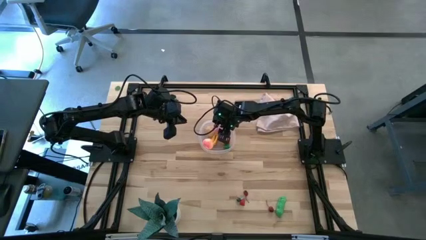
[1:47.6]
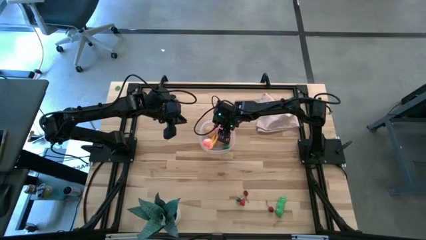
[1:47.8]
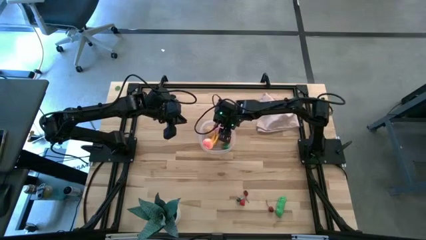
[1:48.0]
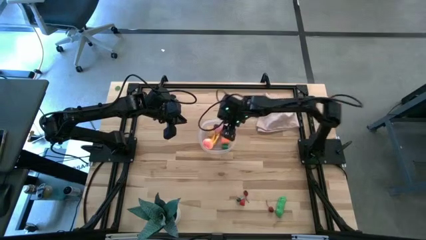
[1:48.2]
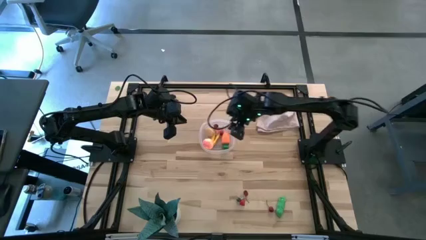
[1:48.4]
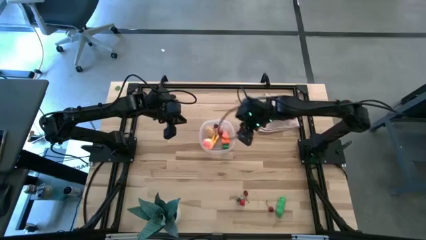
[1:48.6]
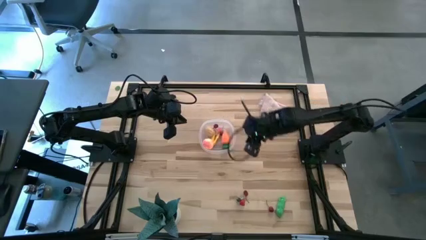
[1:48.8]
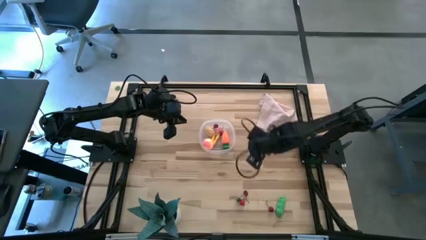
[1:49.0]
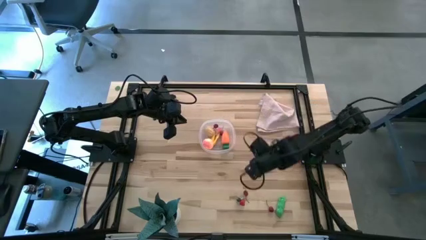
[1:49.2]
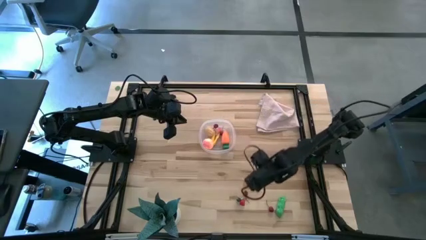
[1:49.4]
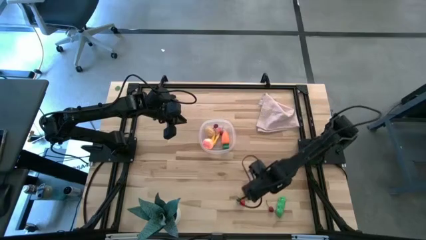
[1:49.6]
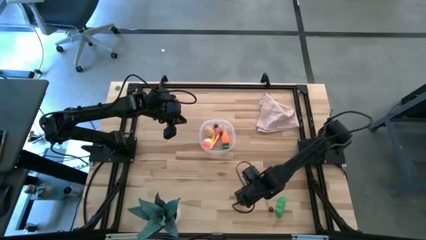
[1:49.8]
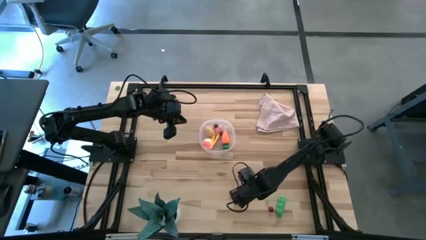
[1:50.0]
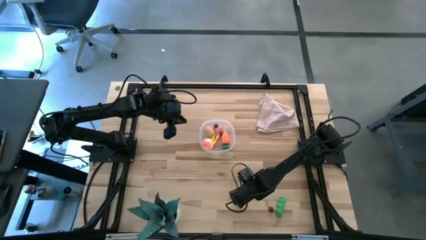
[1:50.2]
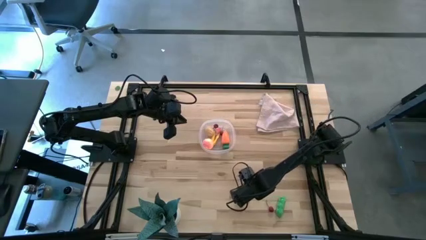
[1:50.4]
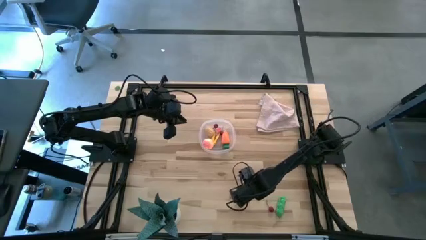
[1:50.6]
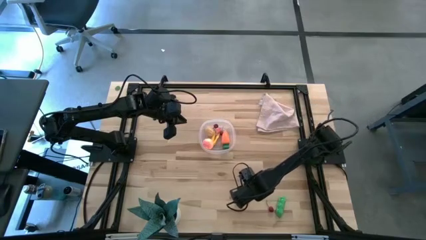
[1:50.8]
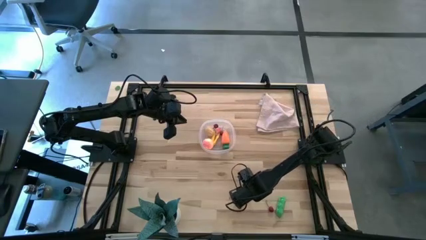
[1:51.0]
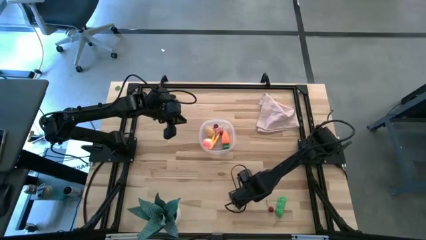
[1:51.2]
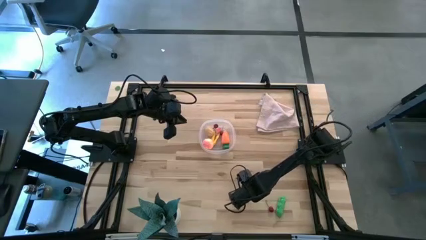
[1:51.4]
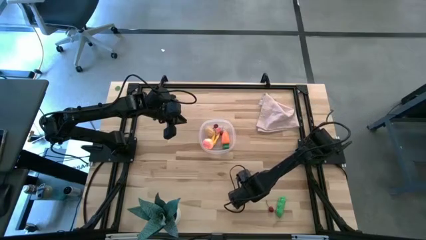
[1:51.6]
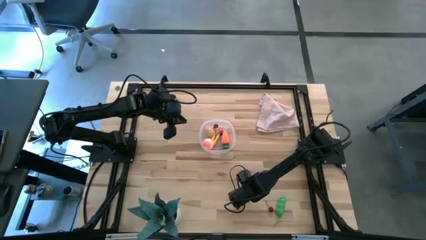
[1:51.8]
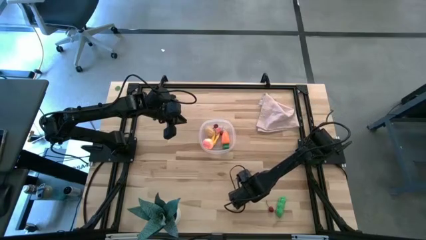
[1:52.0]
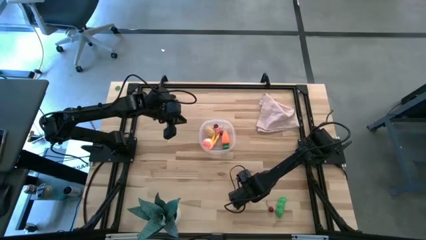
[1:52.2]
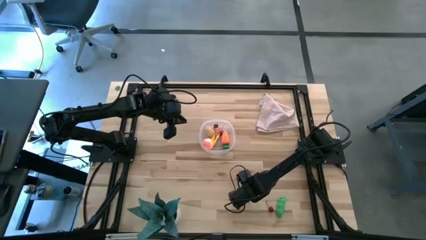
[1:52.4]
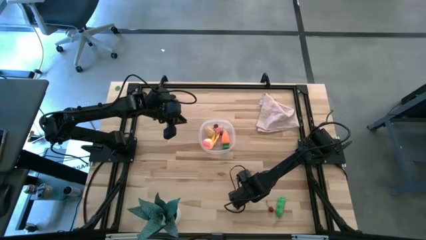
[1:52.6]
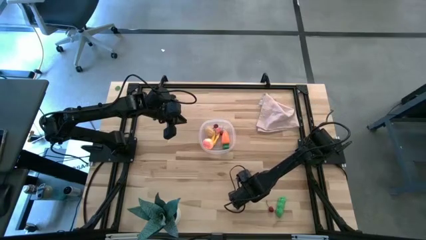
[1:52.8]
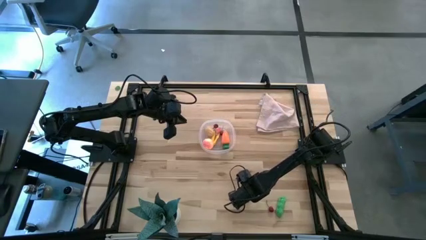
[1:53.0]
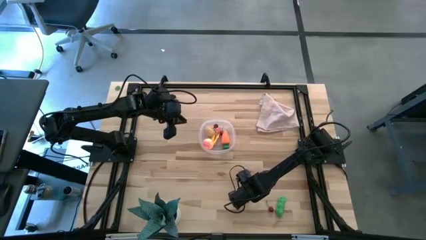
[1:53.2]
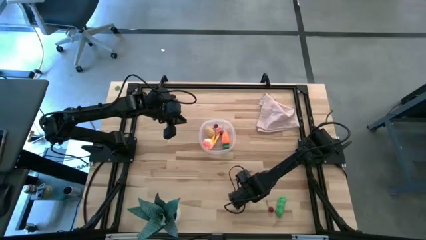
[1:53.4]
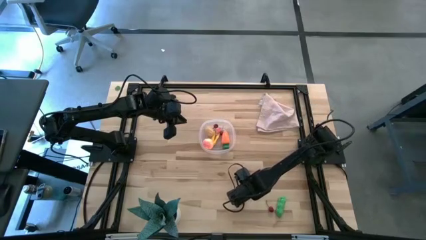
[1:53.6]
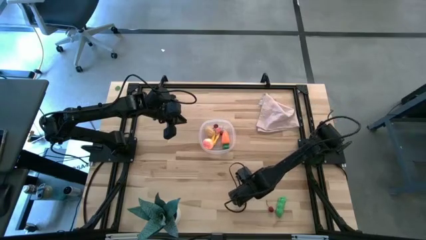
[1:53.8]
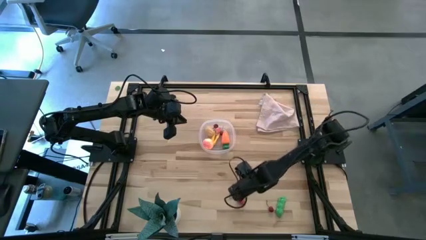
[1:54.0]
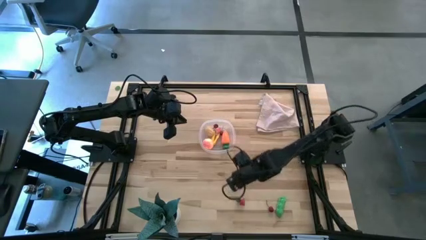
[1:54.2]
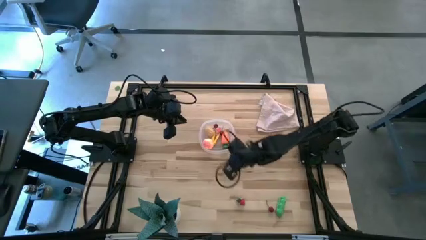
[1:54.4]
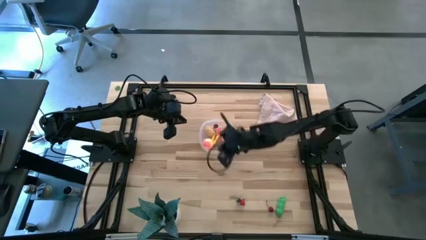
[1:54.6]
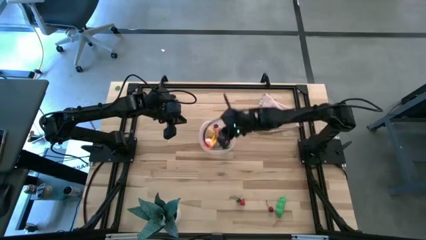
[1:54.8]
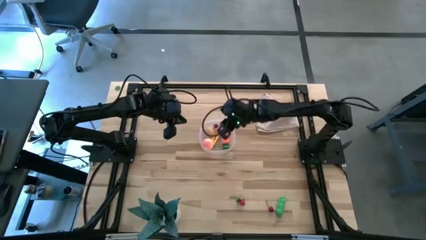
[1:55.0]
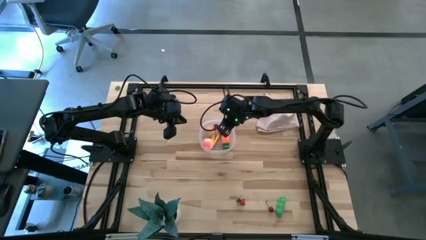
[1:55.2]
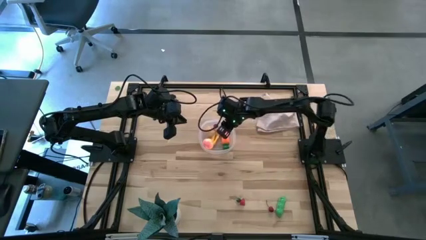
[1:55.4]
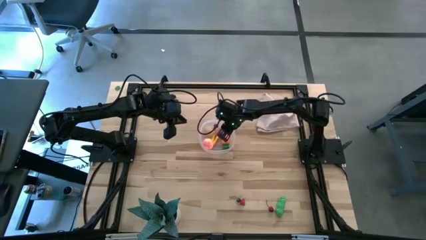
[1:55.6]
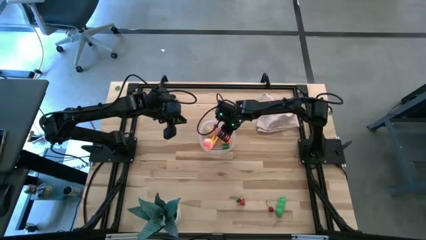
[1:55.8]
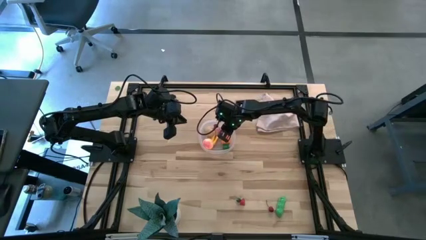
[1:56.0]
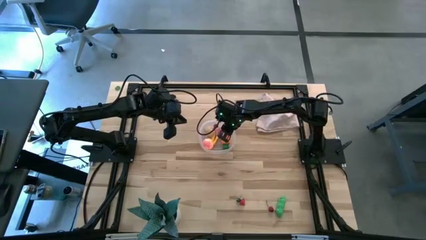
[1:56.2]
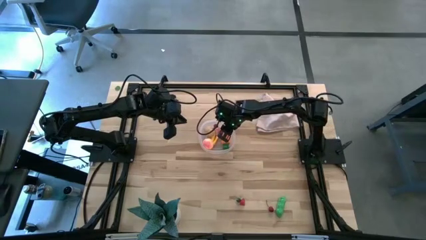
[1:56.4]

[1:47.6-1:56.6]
Task: Pick and placing Produce into tupperware
Put the red cherry into the transparent bin

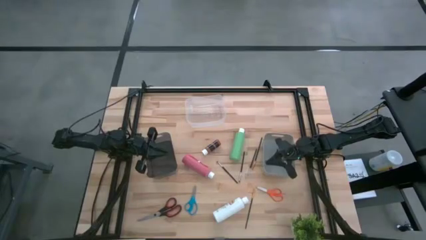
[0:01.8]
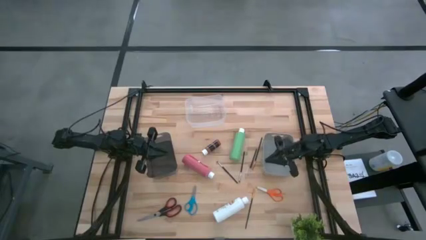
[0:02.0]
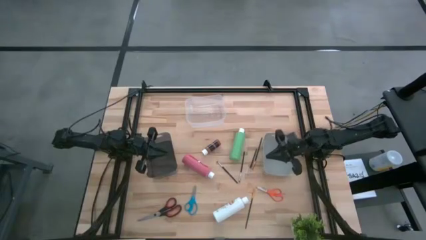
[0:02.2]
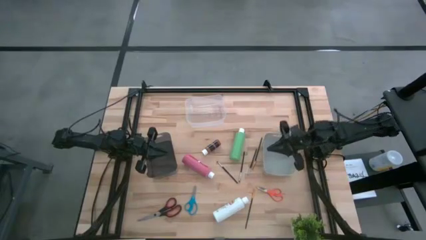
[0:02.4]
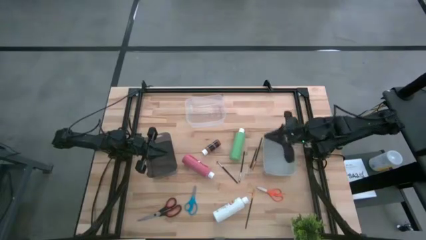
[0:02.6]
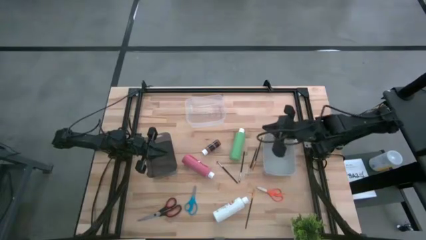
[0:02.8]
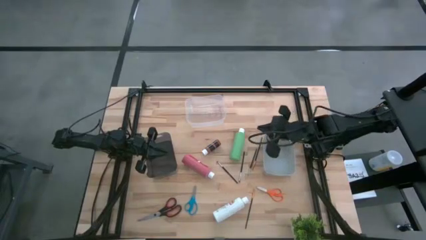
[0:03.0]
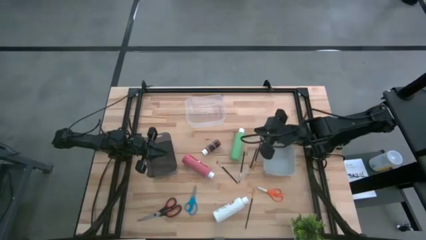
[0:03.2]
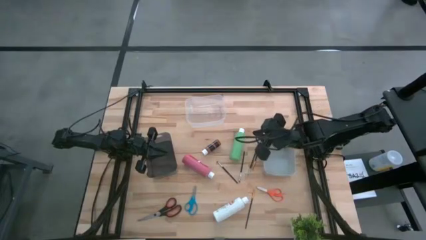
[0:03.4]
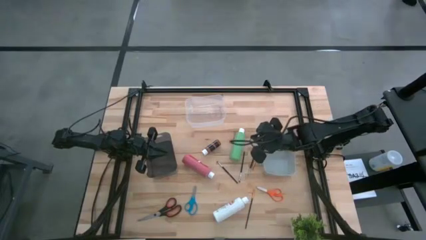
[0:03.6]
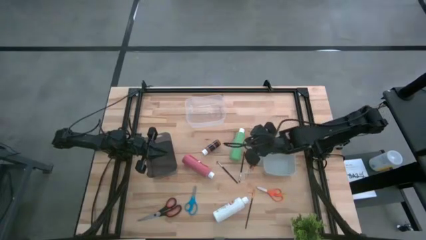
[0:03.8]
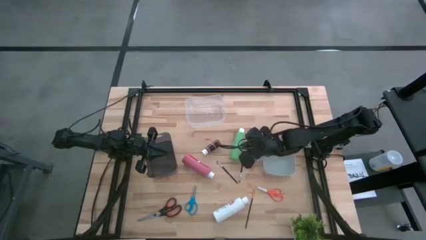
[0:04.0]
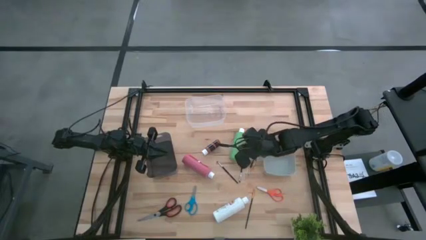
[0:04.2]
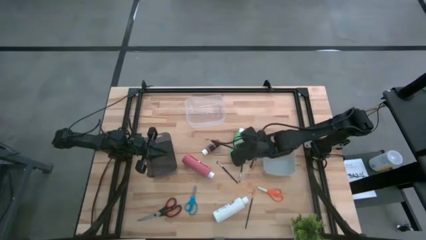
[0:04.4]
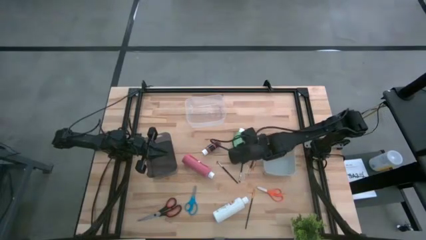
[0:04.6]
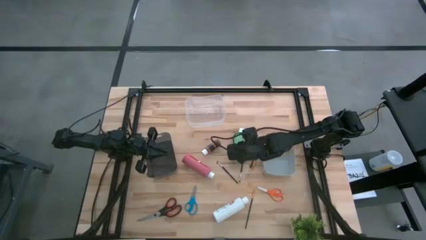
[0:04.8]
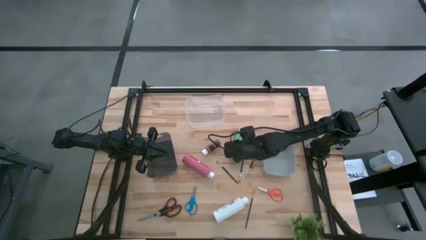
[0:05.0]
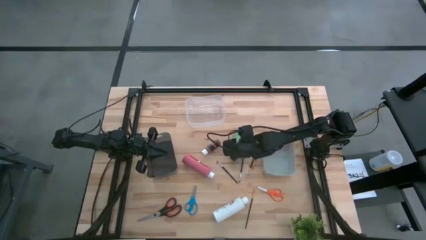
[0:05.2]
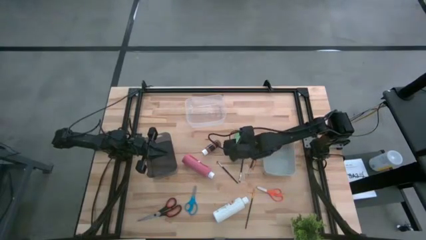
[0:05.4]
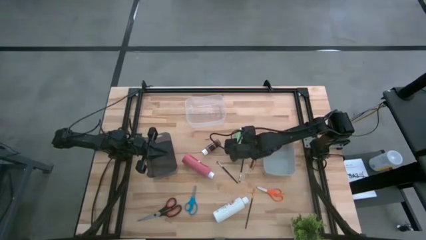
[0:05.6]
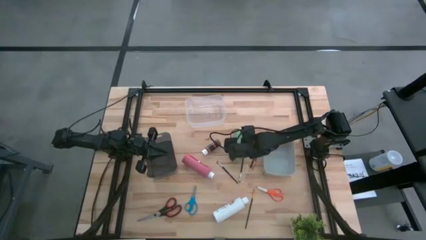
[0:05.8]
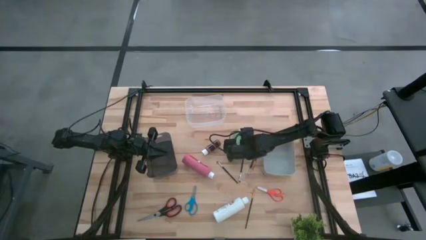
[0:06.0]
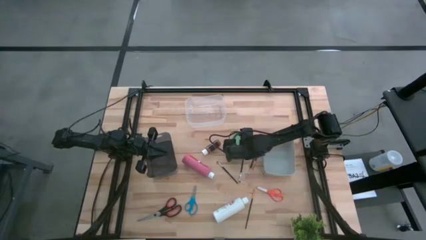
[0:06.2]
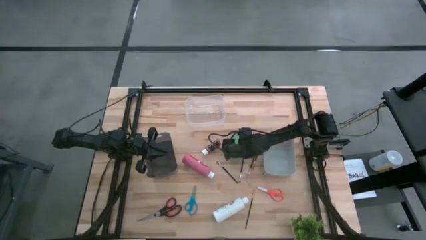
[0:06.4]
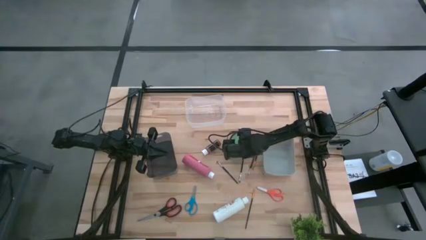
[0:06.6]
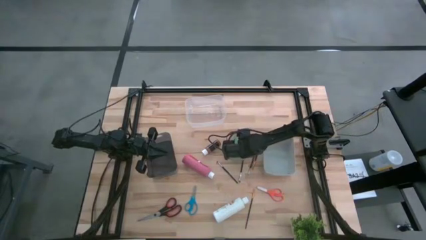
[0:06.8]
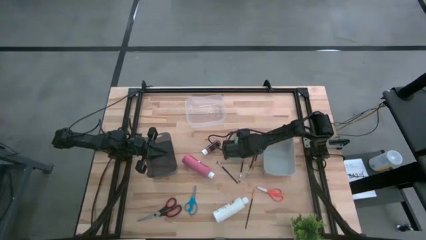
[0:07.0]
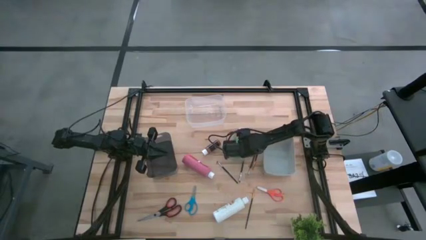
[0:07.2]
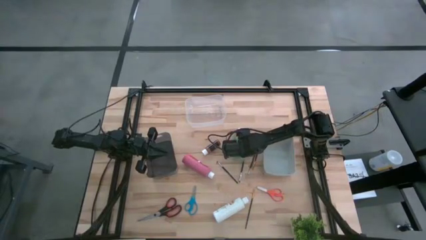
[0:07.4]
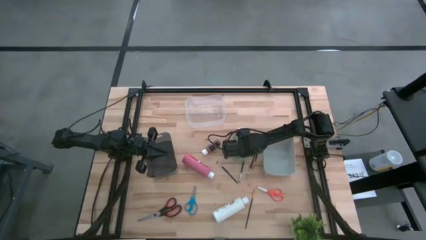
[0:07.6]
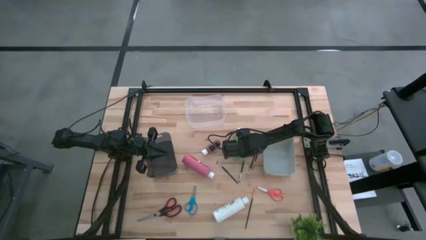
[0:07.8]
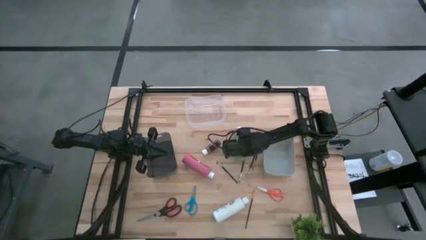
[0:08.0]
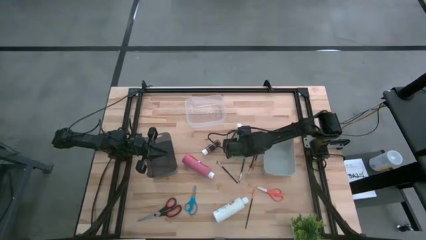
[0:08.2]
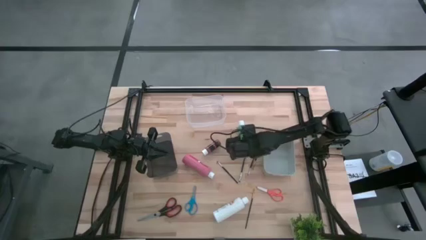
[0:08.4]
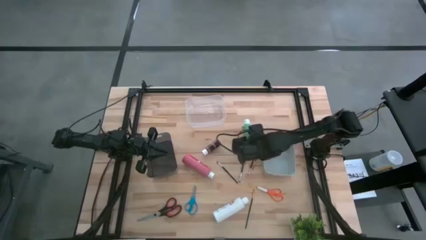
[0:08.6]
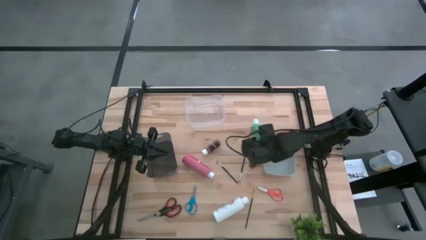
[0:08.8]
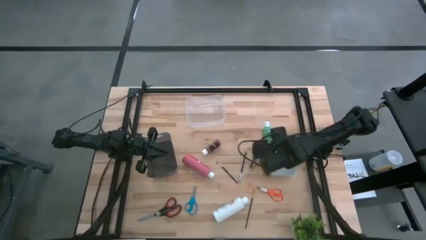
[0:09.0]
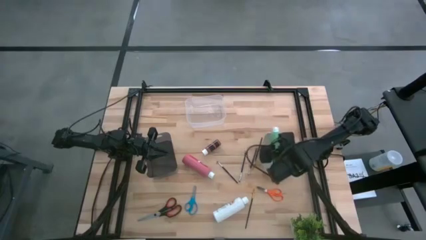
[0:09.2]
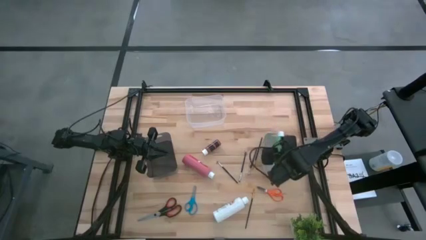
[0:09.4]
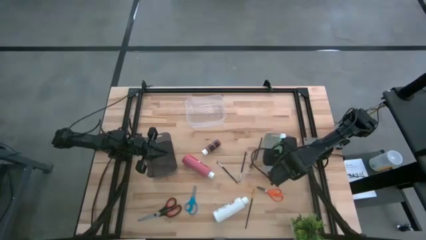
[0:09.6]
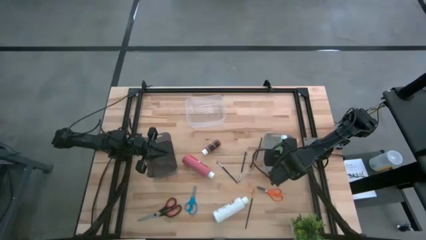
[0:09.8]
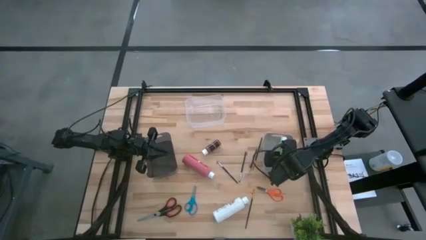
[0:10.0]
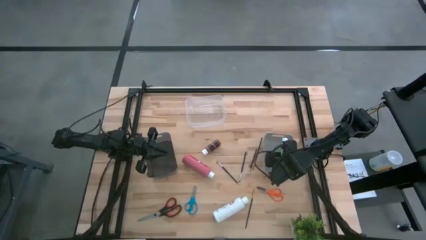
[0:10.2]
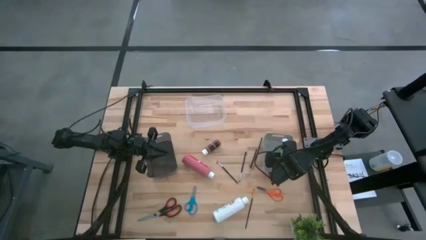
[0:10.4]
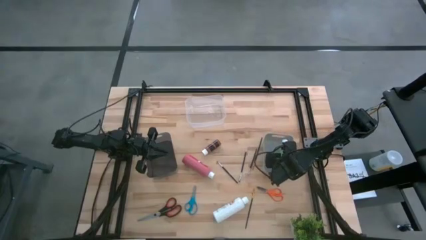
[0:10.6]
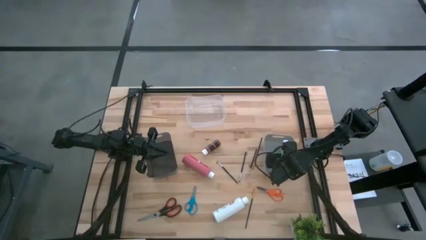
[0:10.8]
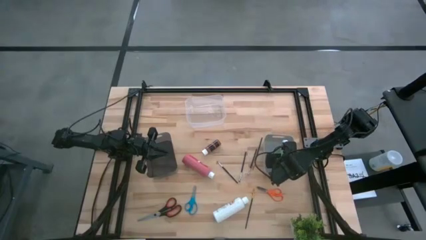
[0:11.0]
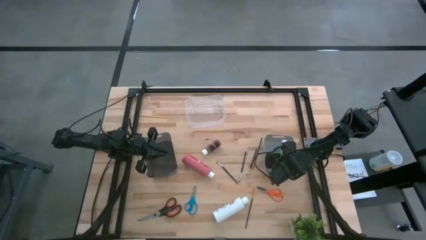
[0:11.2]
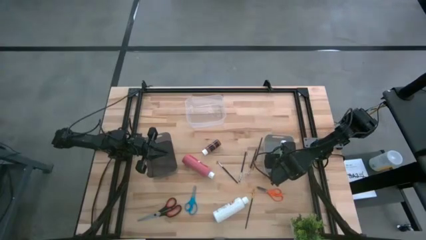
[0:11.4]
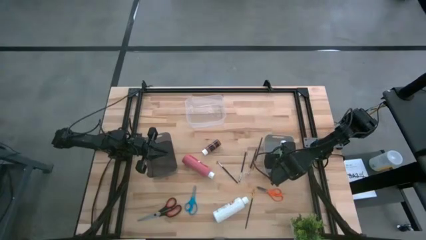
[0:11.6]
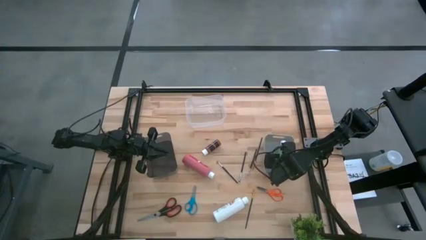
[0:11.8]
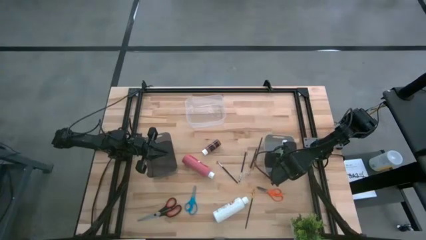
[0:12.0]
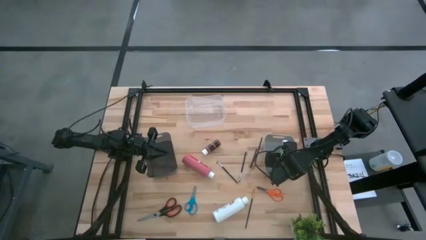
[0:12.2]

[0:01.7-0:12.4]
Task: Pick & Place Paint Supplies
Put the green paint bottle into the gray bin
